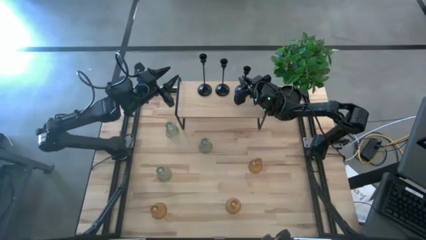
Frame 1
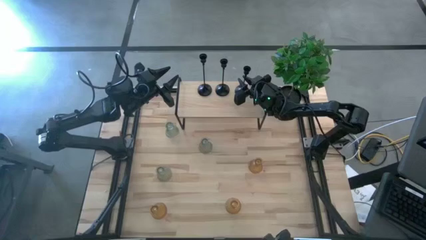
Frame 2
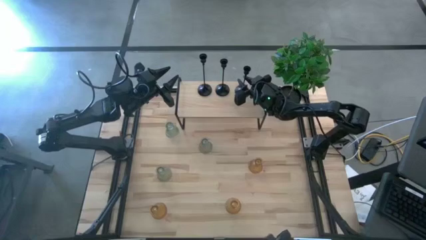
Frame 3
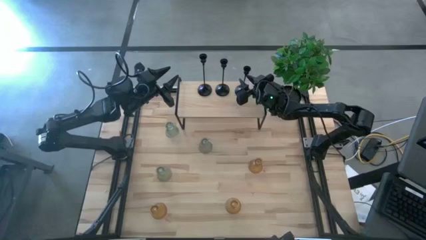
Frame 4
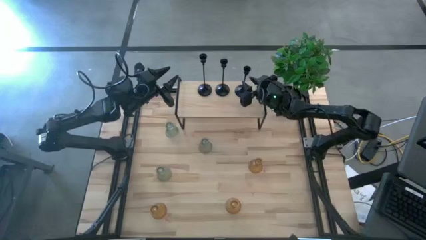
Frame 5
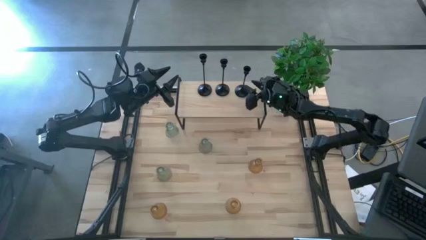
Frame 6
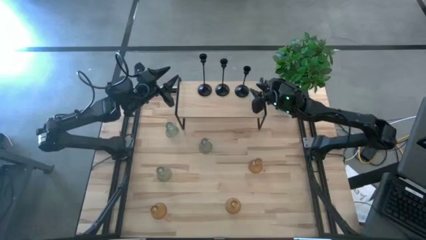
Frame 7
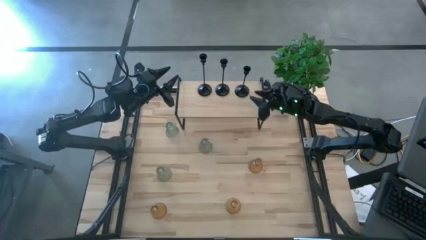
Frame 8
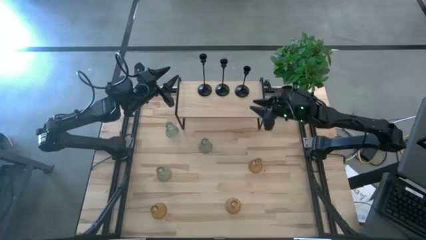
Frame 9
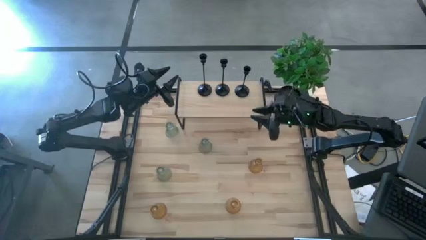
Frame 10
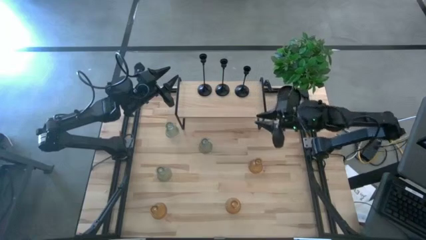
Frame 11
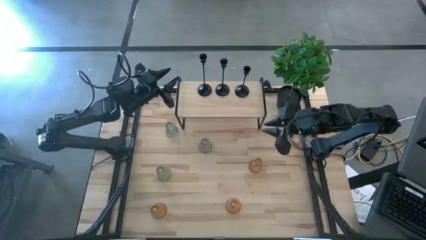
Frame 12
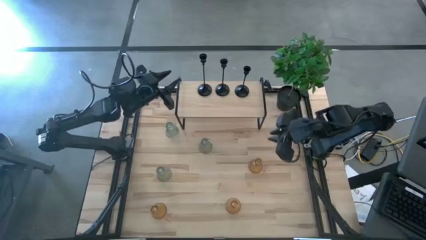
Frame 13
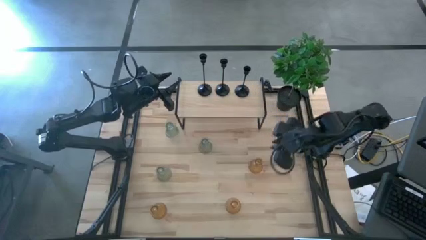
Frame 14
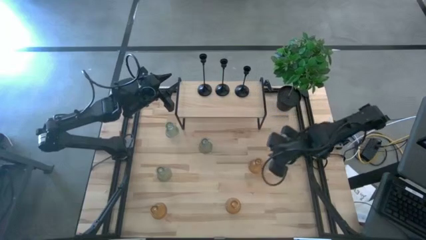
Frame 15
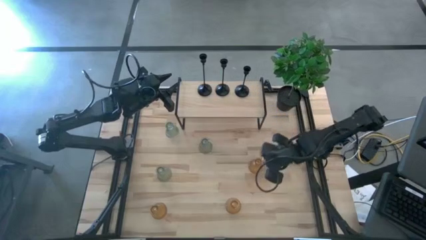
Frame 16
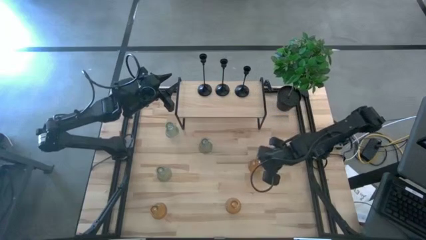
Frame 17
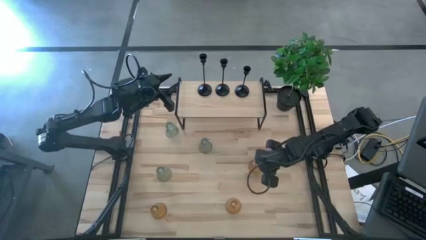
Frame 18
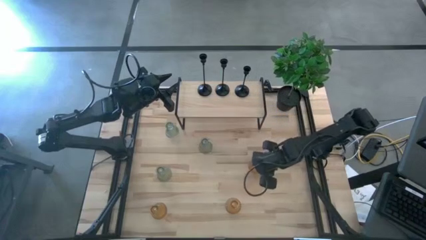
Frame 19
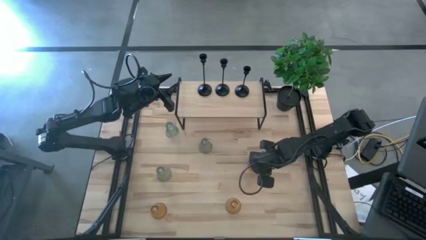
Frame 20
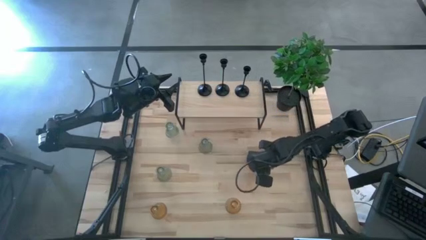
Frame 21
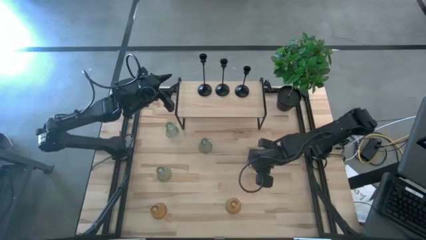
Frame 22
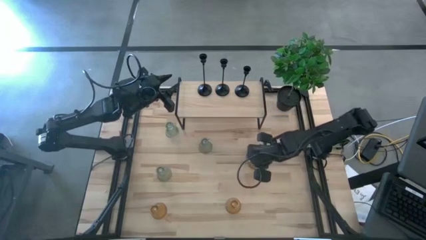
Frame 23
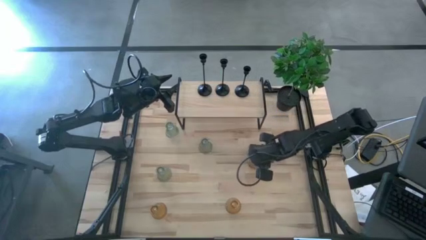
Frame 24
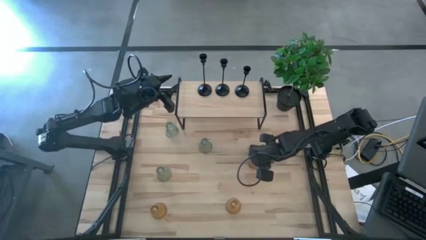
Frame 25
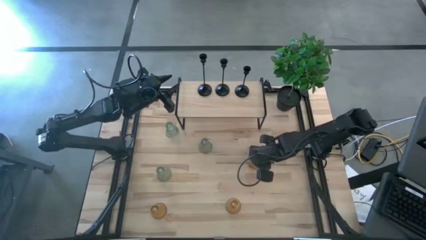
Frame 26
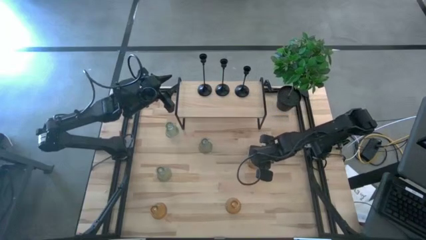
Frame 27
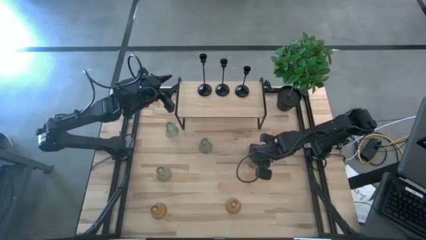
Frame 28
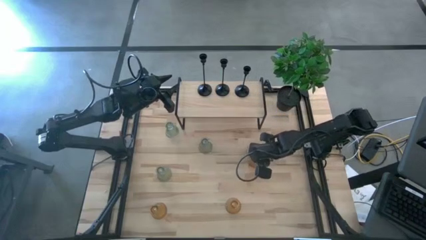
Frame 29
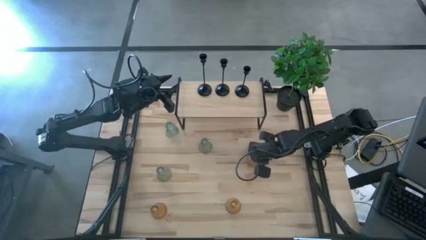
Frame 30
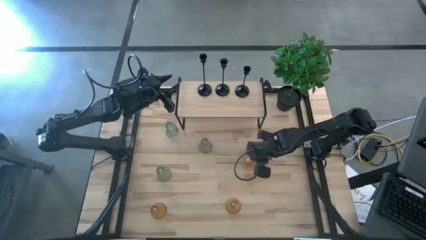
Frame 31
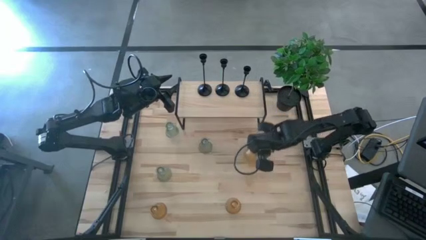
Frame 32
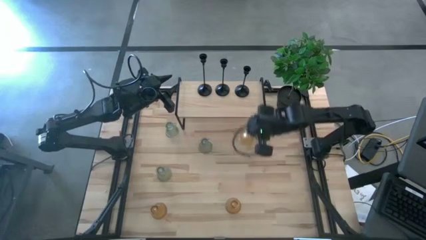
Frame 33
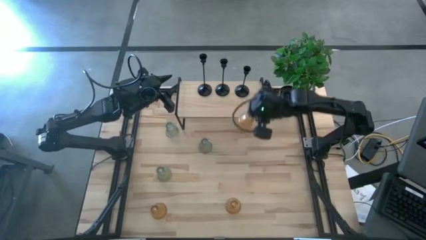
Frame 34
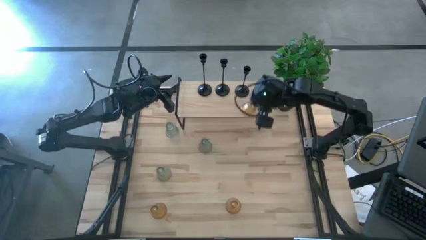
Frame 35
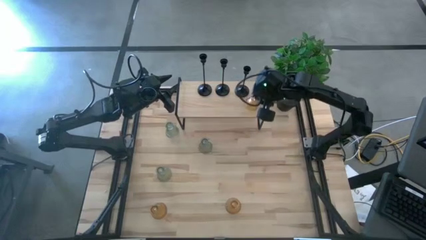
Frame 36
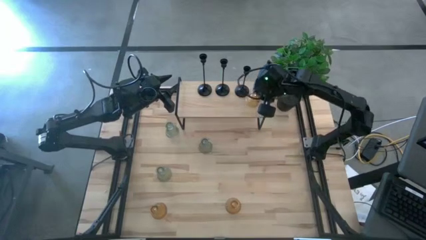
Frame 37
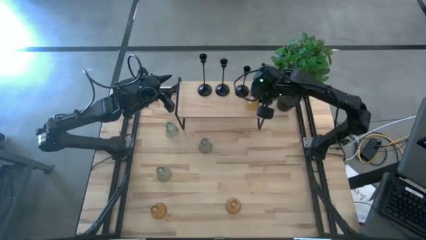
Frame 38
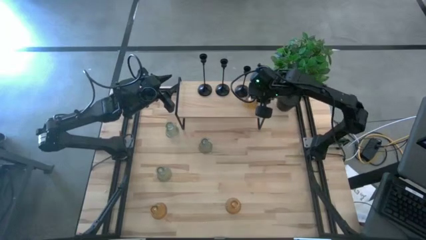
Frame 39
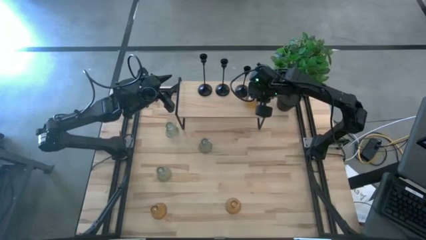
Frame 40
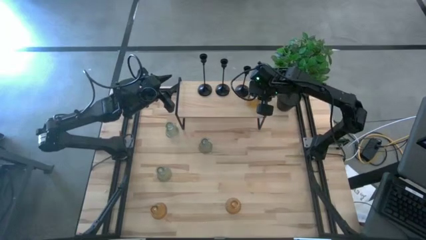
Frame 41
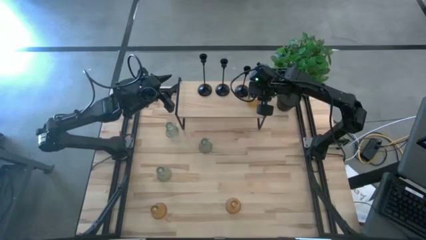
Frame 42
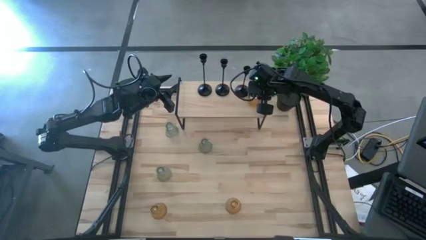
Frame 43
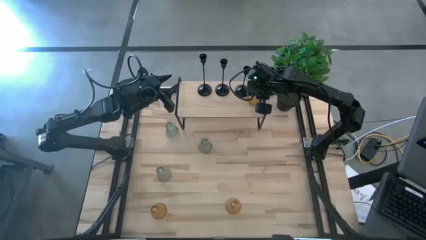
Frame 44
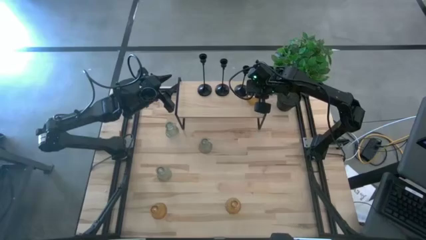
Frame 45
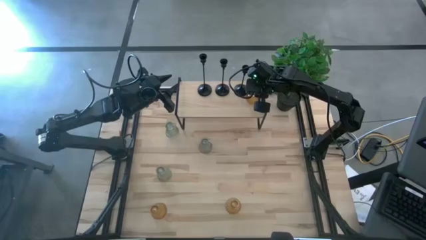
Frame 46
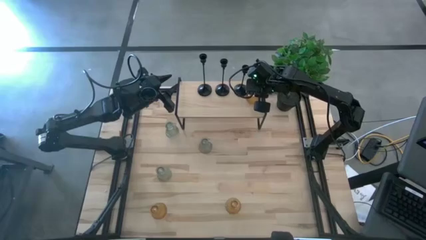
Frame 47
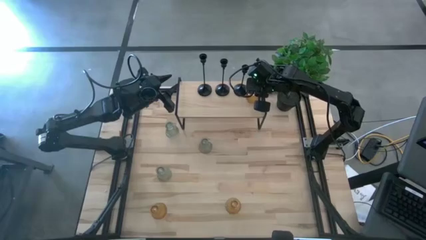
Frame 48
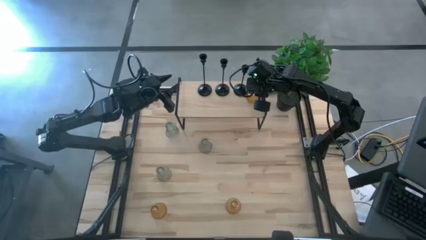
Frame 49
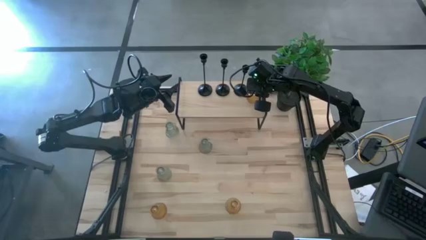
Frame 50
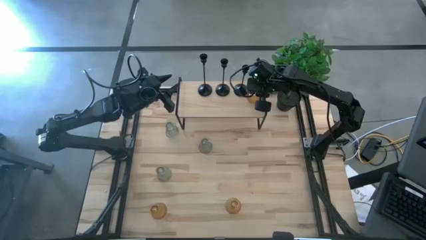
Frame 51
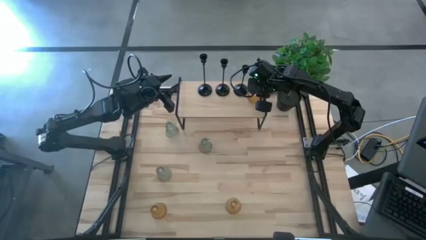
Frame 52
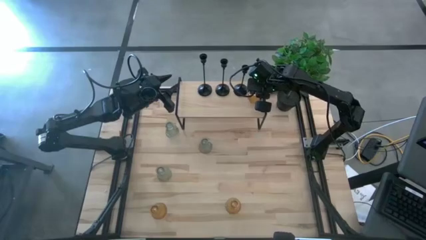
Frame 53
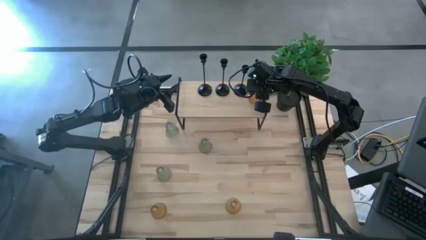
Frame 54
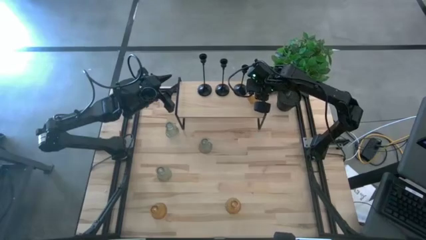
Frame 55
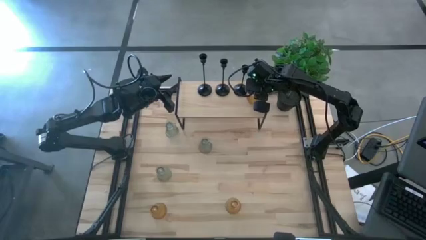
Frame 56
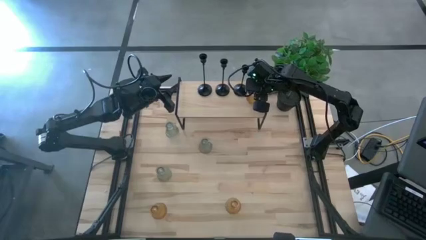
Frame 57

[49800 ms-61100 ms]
Task: Pick & Place candle stick holders
Put the top right yellow candle holder on the shelf

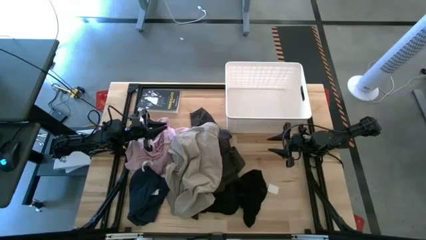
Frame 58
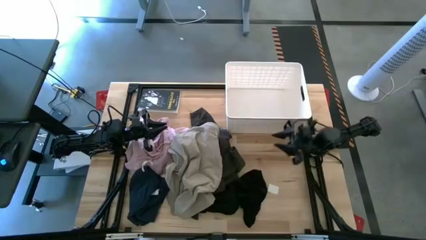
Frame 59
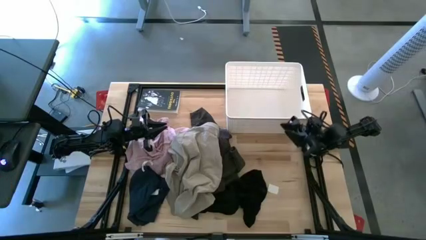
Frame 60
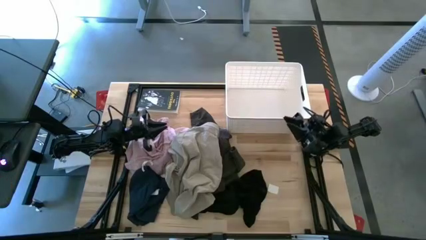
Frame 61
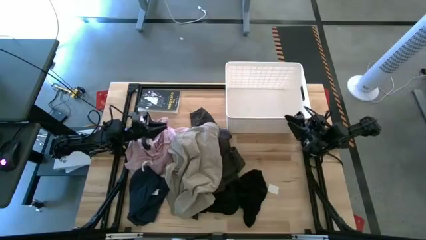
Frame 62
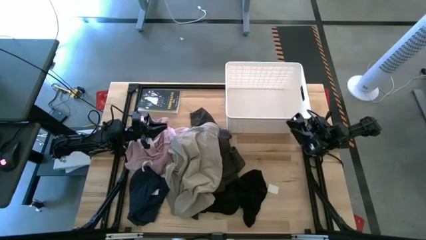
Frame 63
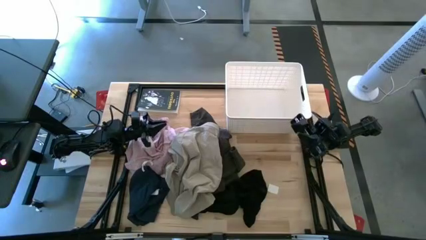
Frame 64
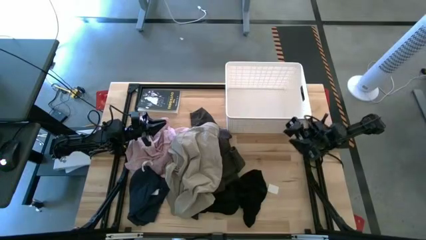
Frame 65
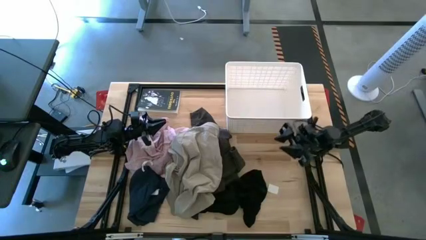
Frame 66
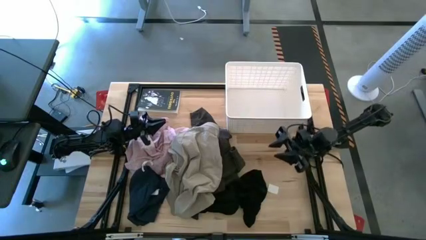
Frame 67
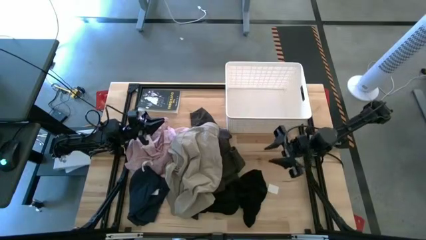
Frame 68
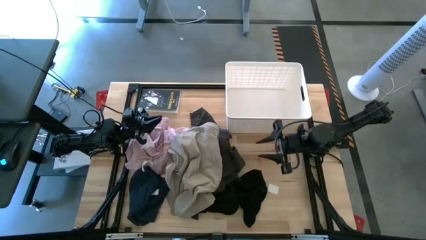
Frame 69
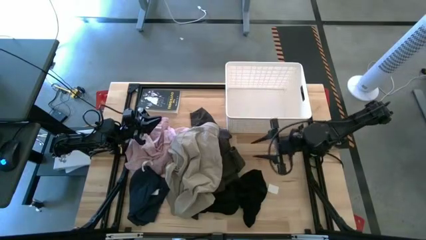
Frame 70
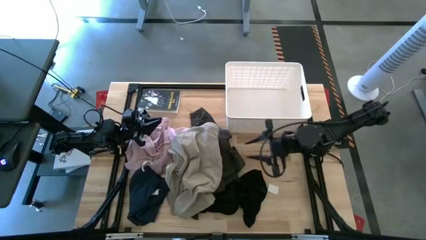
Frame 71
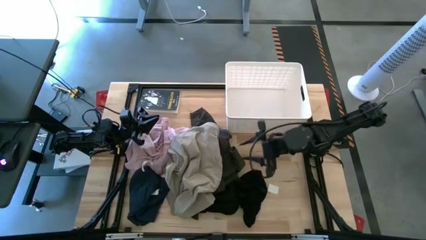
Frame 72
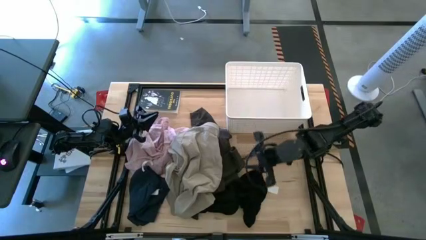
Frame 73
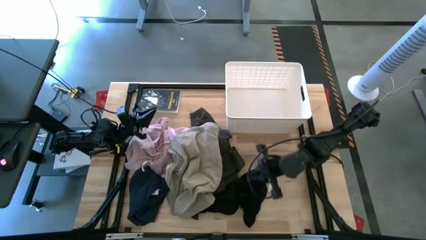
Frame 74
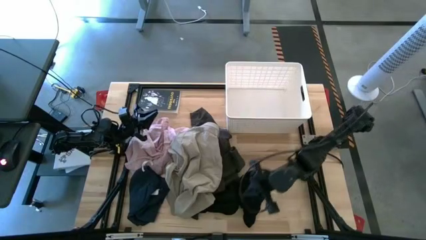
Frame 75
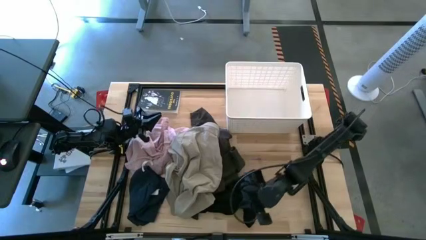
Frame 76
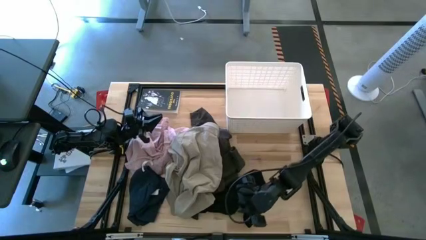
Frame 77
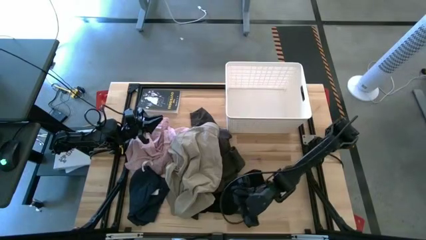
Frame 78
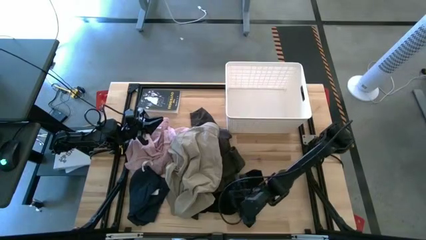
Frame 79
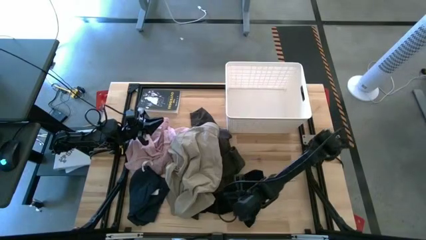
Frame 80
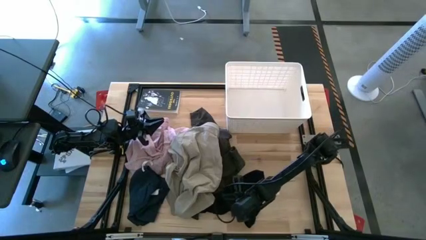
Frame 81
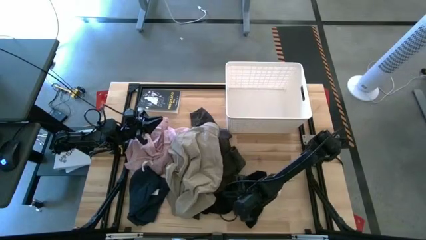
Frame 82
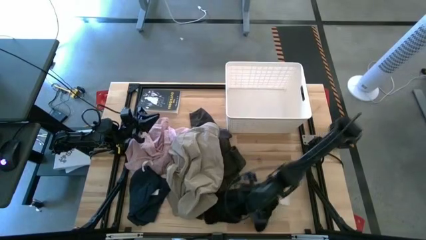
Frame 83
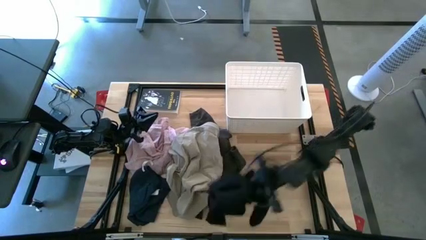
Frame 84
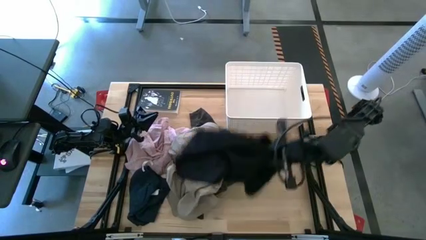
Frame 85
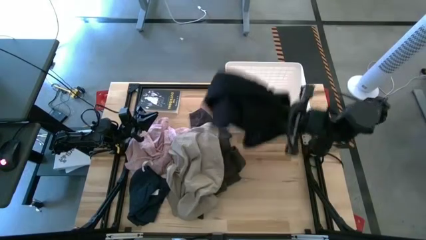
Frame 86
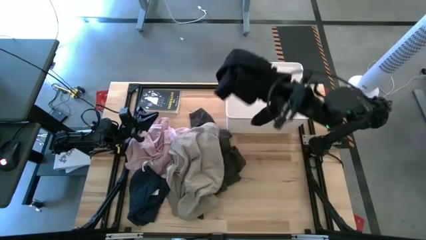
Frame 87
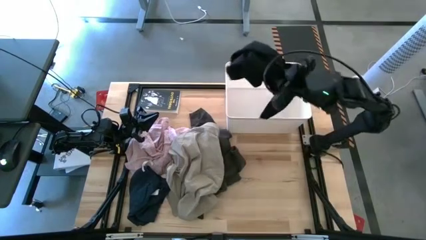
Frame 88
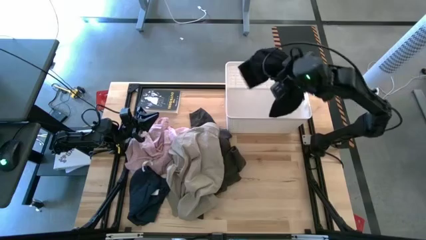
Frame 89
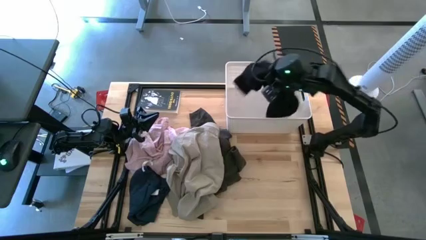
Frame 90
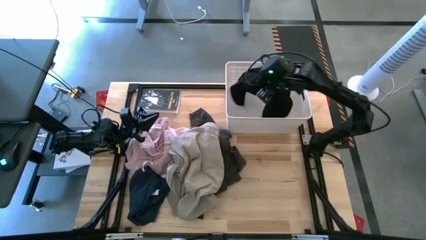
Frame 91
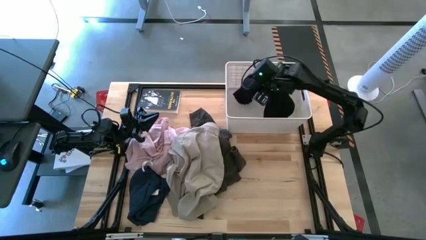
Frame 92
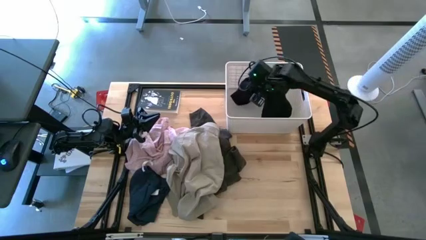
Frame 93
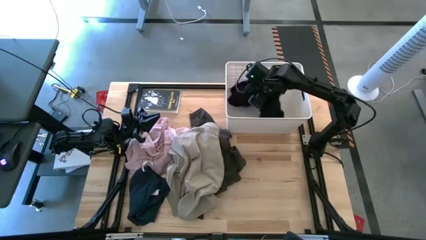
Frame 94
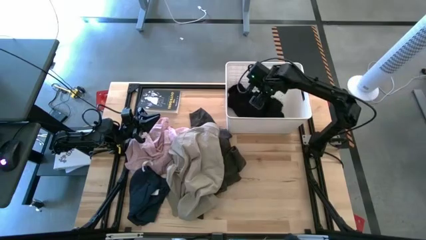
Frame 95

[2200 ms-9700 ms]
Task: Sort clothes
Put the black shirt into the laundry bin
